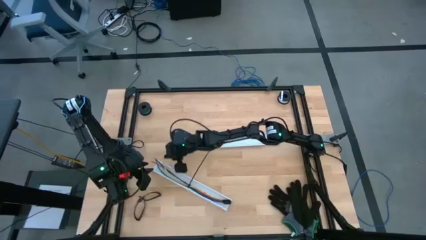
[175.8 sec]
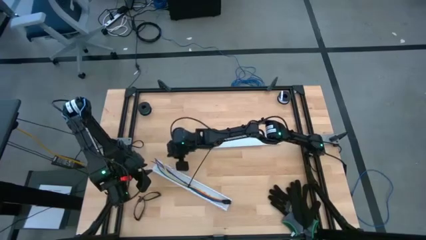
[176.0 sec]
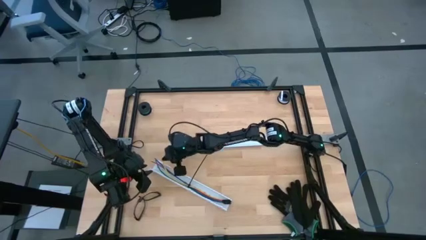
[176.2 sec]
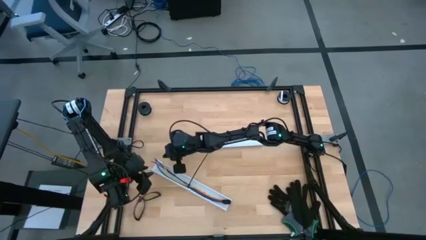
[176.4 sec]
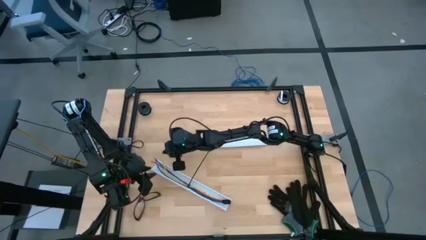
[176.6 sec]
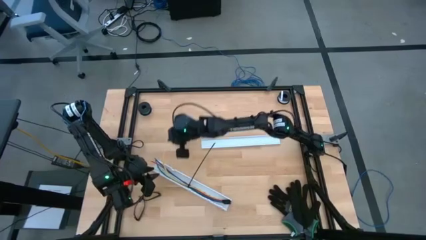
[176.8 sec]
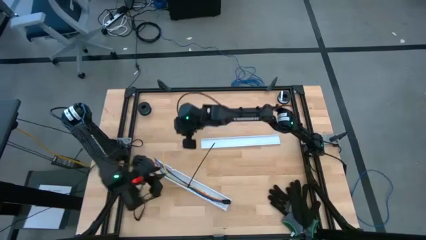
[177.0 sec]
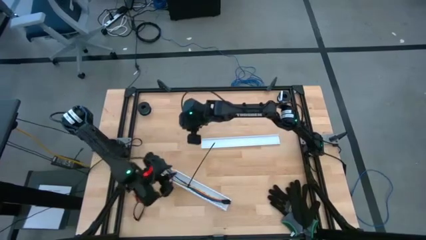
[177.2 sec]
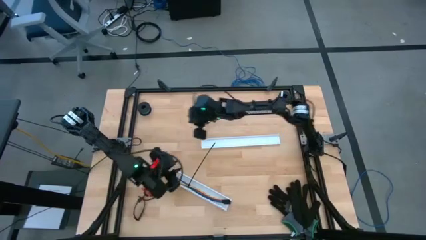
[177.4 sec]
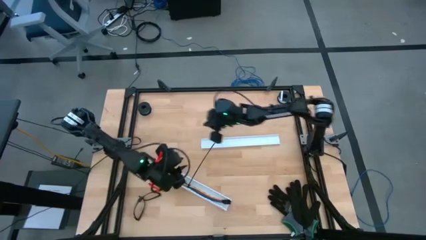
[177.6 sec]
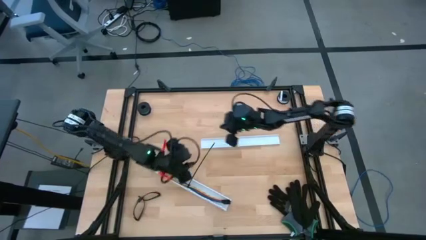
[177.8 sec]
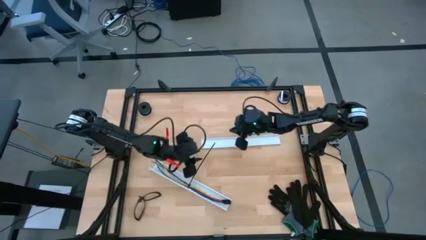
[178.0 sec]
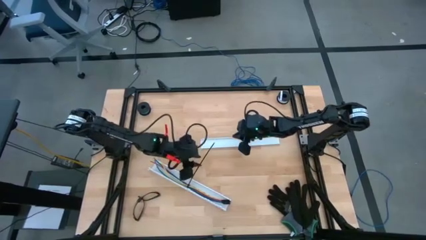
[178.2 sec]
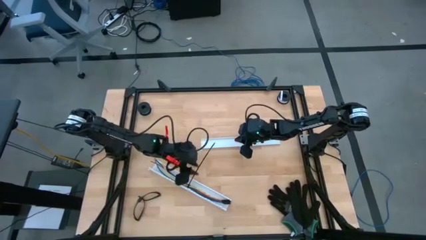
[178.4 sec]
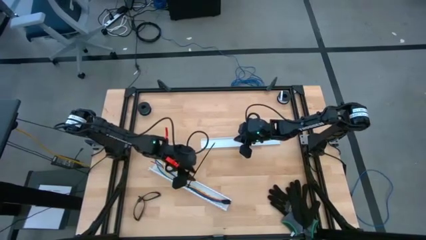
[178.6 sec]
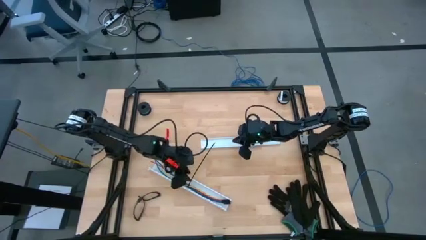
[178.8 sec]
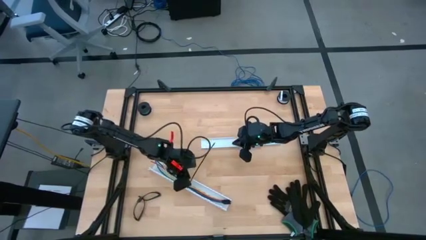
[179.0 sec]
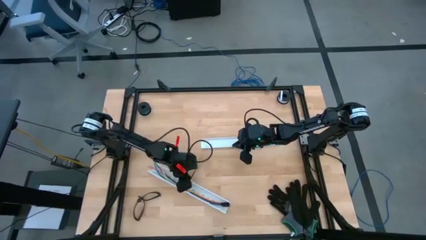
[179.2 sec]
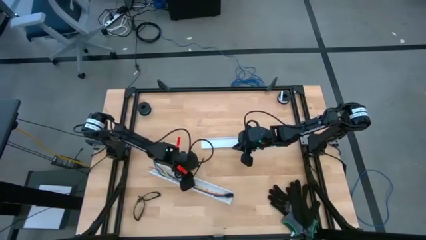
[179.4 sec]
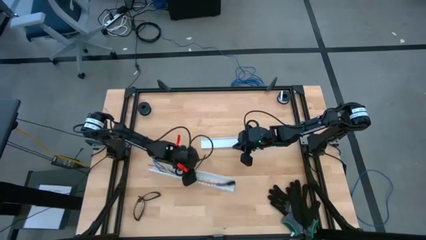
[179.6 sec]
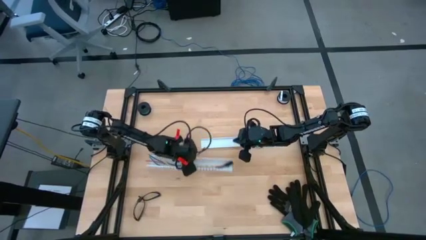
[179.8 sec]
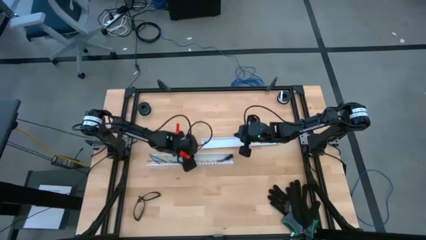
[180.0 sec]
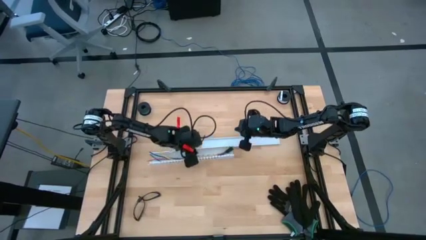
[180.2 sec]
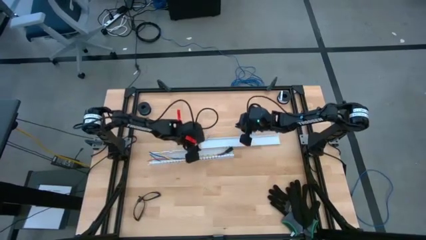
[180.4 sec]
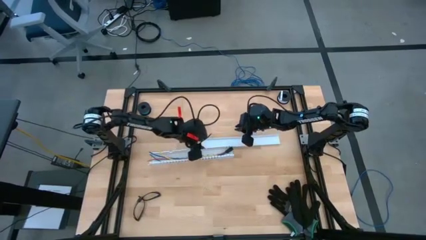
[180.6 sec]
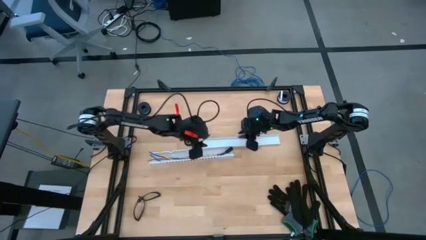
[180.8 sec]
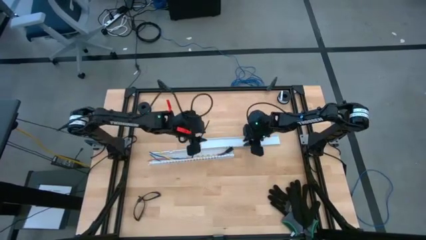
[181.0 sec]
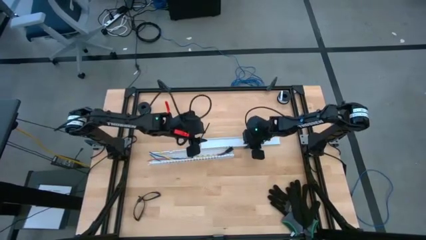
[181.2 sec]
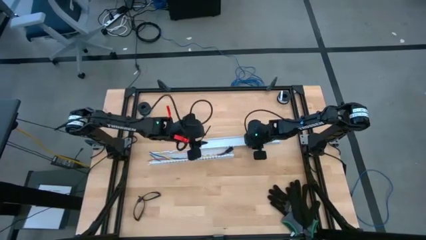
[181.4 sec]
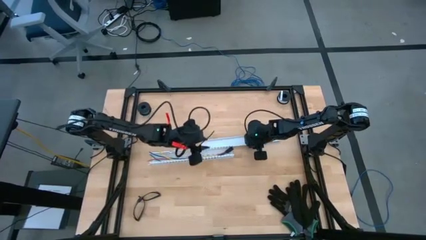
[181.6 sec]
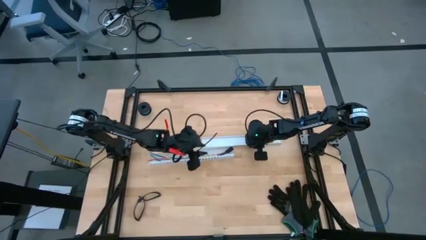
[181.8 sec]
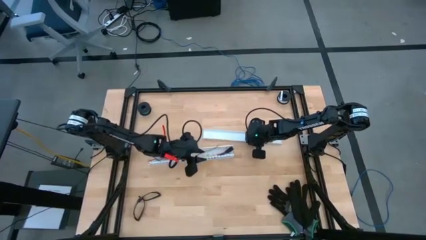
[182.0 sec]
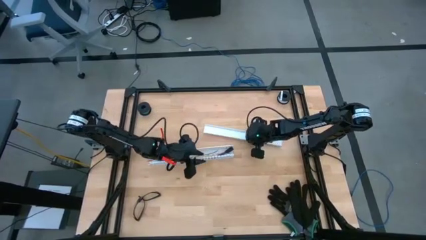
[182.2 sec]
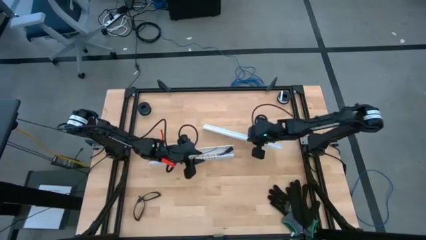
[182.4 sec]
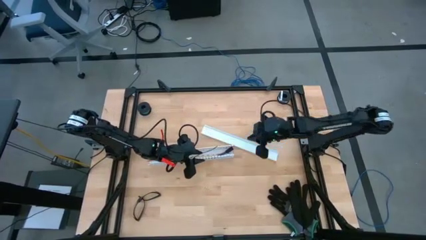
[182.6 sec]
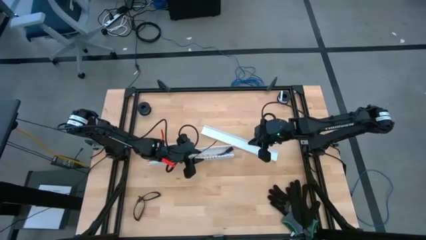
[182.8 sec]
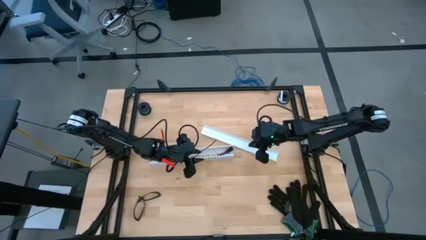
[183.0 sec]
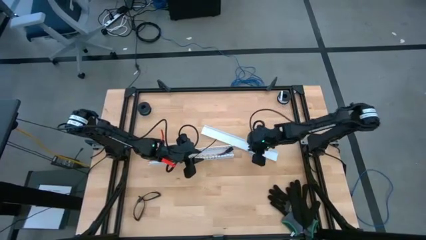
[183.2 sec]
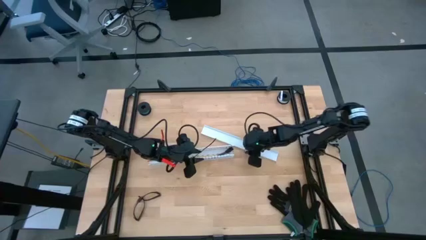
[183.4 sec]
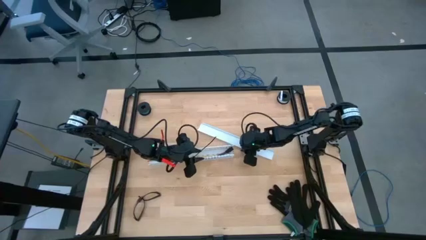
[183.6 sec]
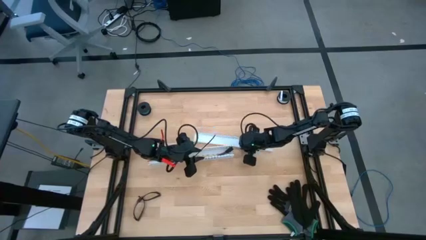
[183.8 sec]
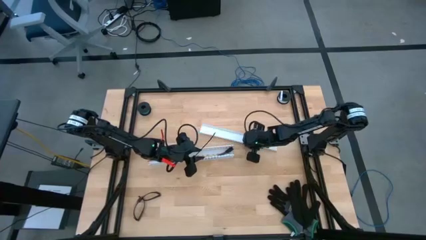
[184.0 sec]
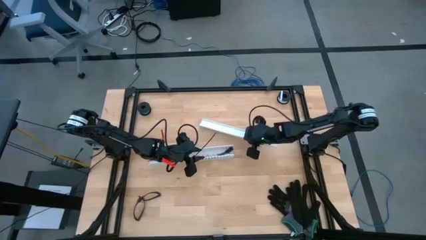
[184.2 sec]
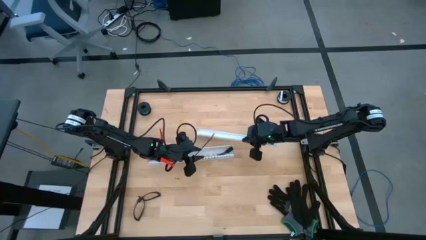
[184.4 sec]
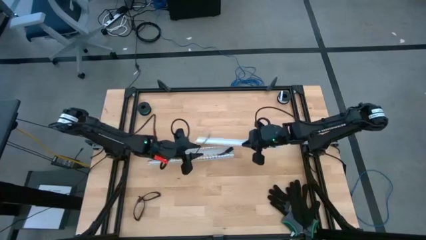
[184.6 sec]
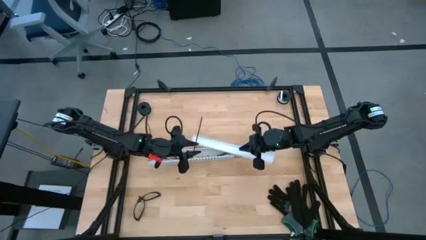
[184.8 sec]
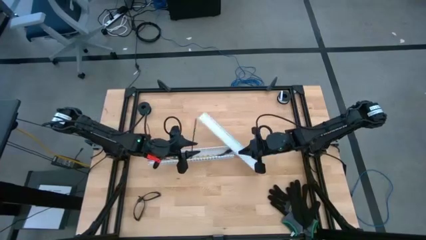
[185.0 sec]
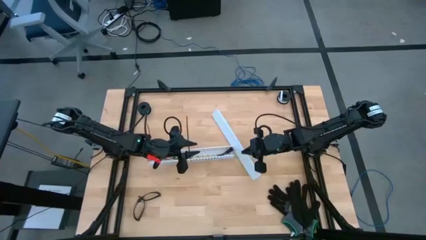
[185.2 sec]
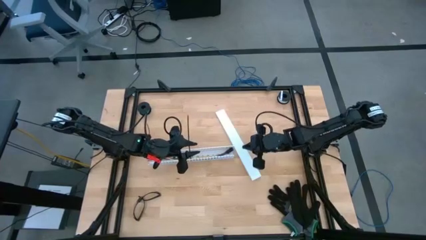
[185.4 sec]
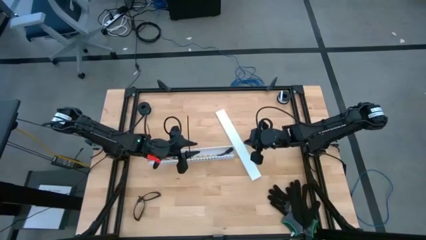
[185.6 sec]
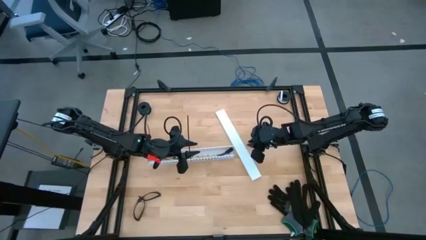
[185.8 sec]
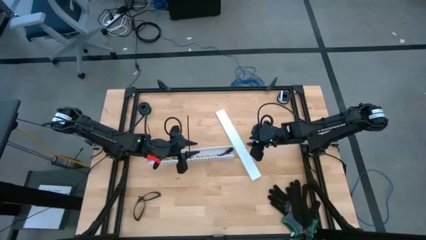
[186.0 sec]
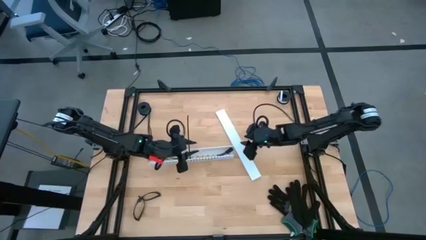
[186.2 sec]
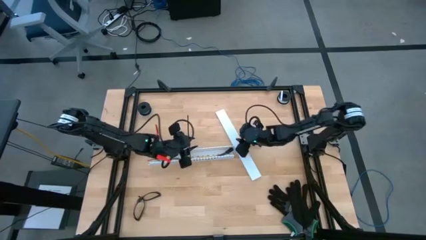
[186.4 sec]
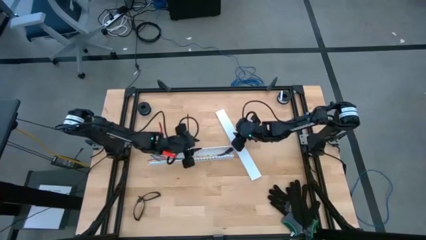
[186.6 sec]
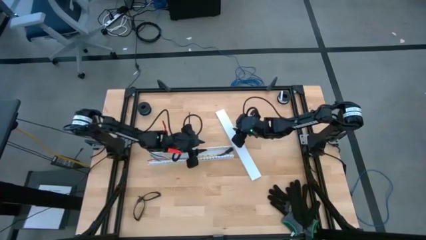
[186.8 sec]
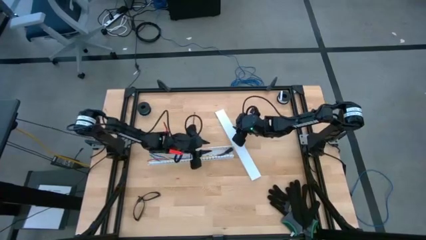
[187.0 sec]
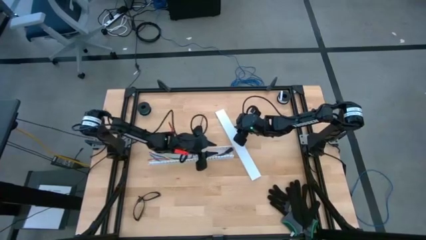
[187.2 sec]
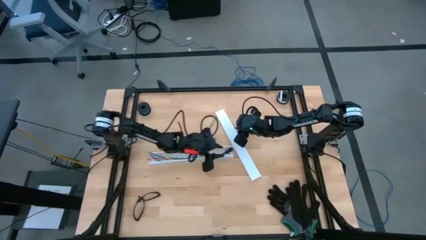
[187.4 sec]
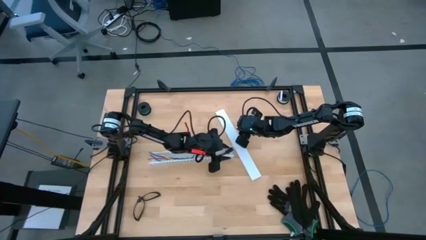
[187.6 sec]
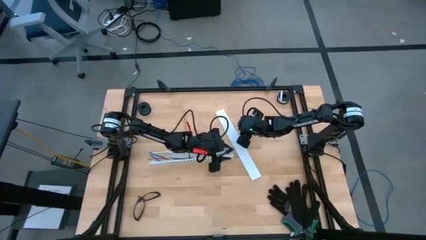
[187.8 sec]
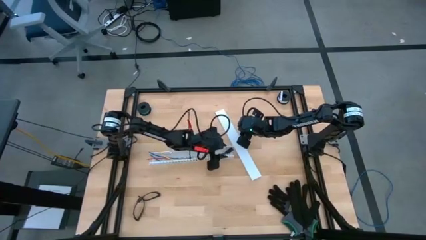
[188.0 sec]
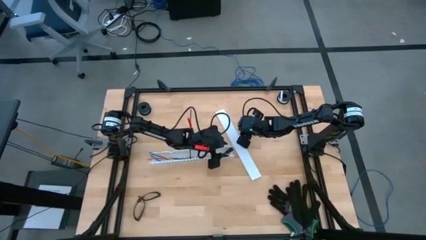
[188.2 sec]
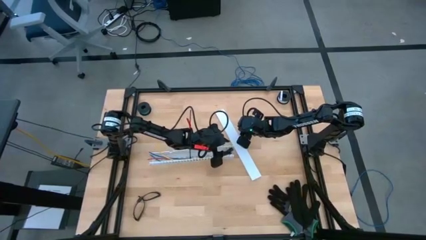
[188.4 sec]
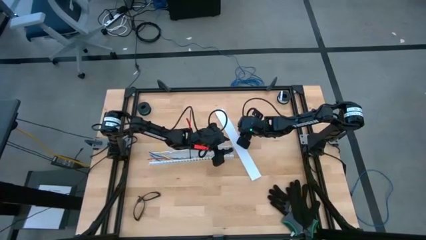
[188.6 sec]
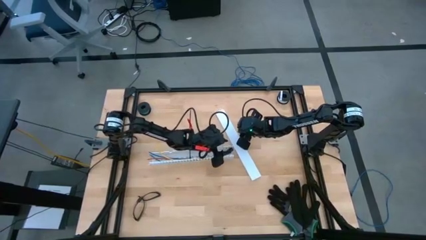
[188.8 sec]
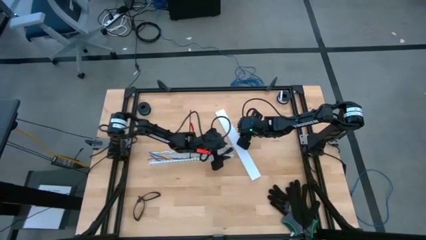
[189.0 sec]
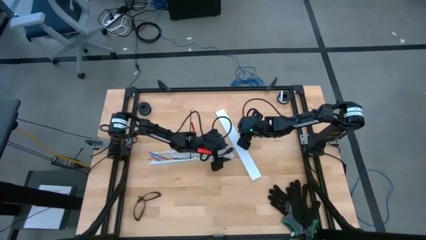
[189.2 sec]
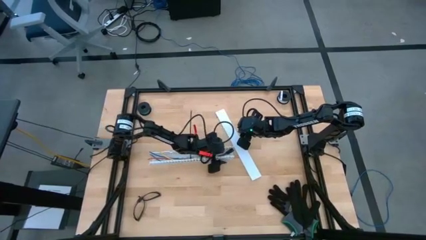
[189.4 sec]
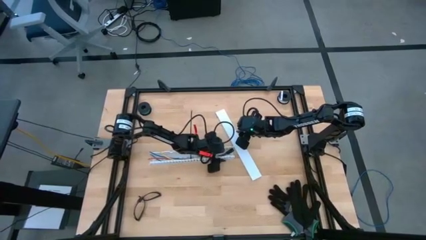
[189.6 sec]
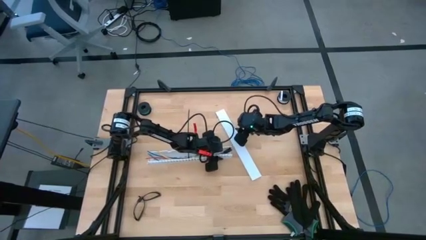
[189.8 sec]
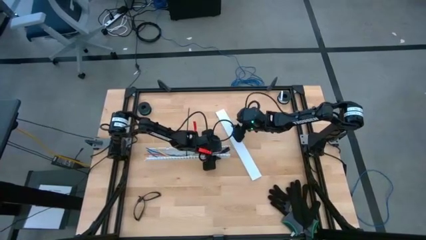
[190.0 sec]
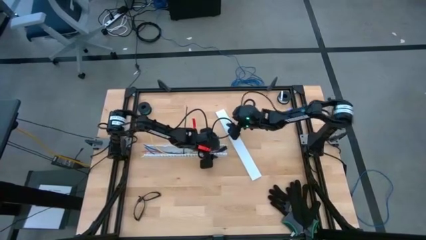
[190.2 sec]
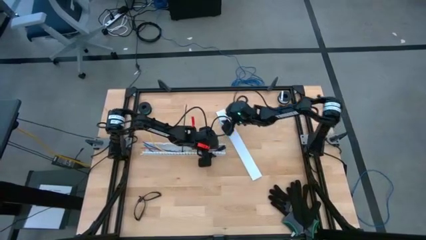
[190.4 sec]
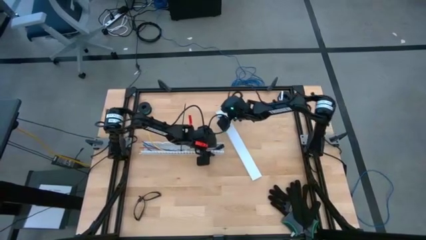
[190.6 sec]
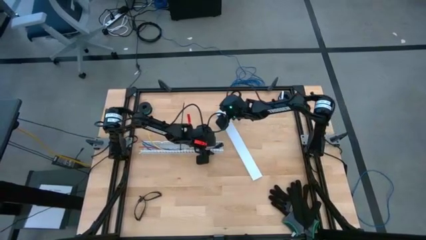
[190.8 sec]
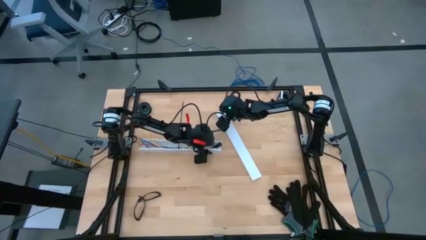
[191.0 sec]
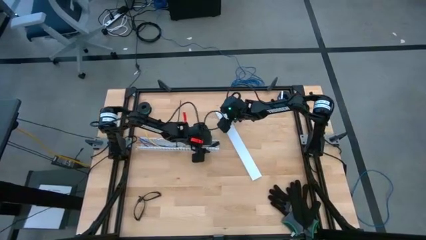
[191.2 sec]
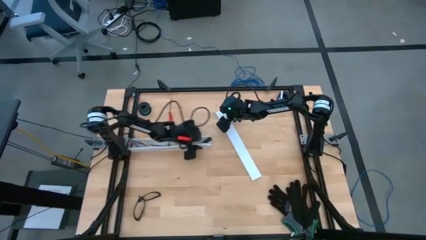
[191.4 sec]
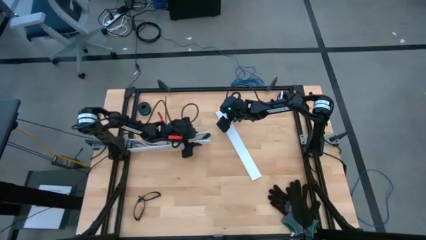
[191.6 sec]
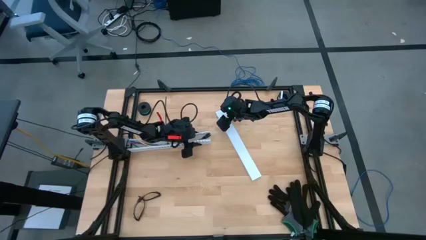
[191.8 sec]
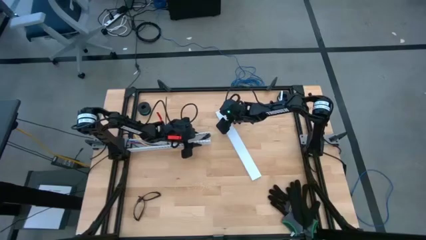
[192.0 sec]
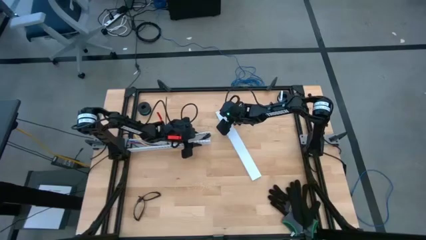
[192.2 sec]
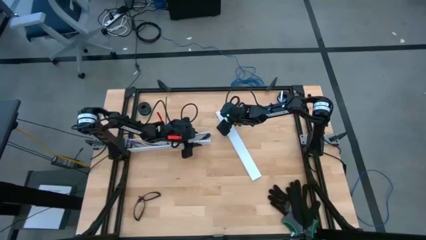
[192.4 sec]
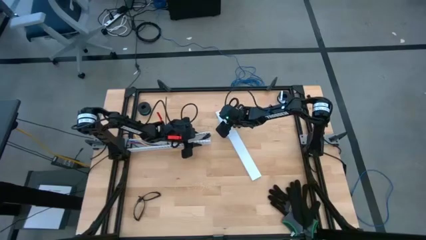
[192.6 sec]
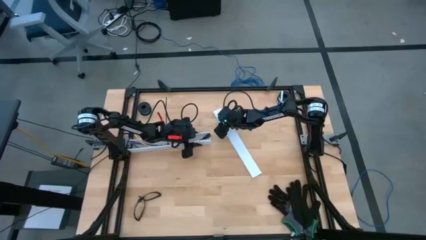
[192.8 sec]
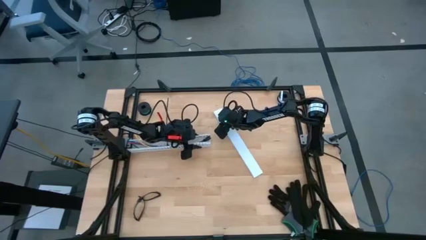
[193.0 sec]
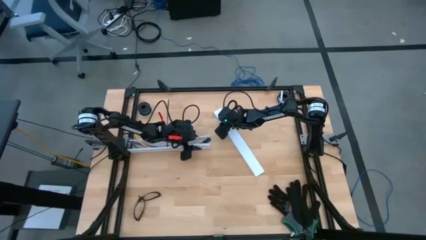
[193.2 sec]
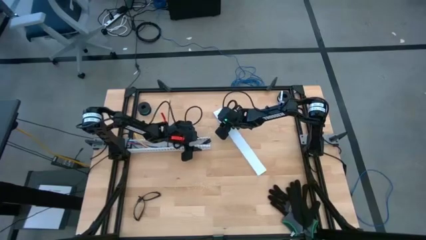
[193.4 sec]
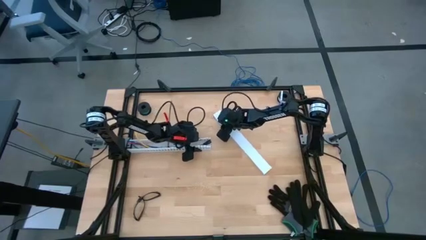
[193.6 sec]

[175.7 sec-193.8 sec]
Task: Ziptie cables
Close the white cable duct using the cover
